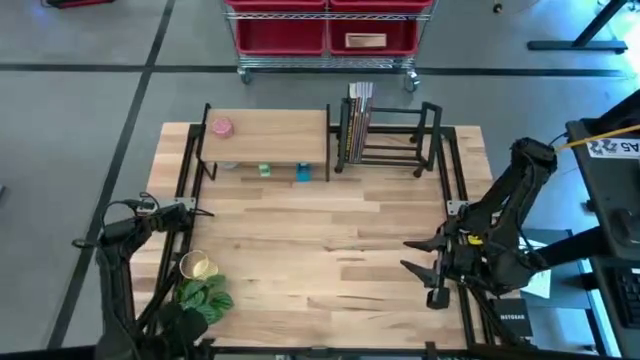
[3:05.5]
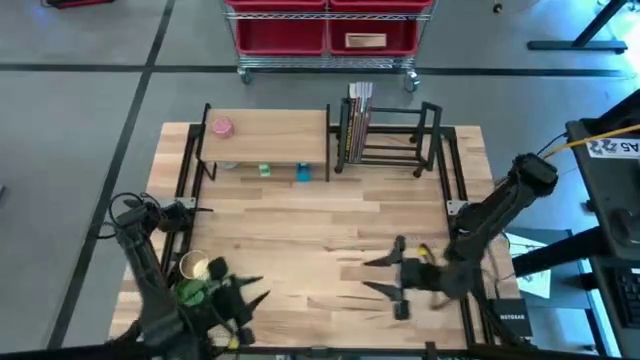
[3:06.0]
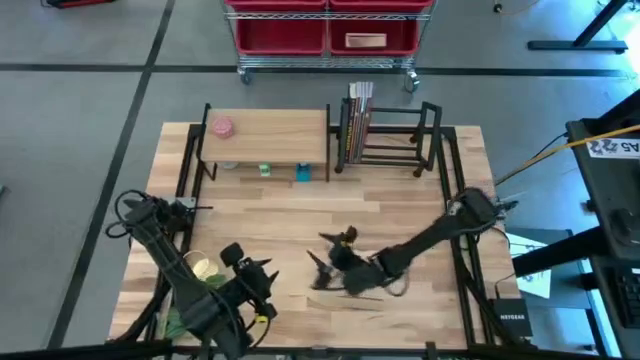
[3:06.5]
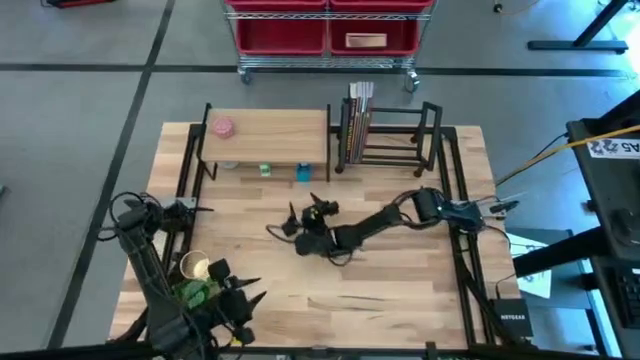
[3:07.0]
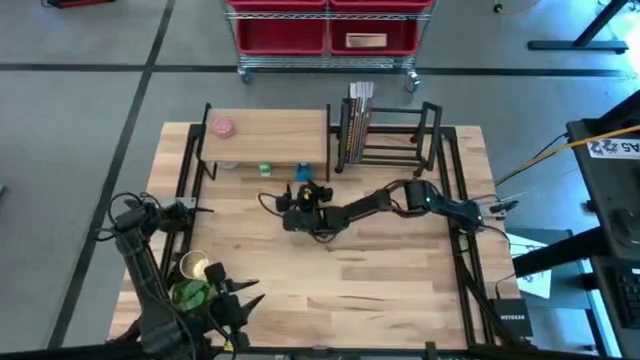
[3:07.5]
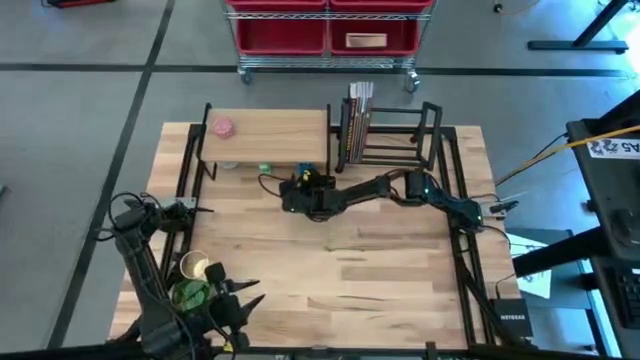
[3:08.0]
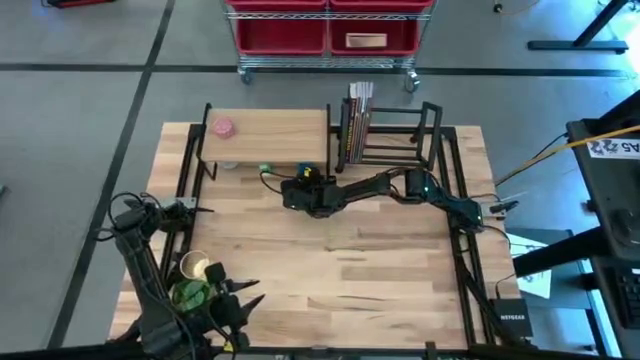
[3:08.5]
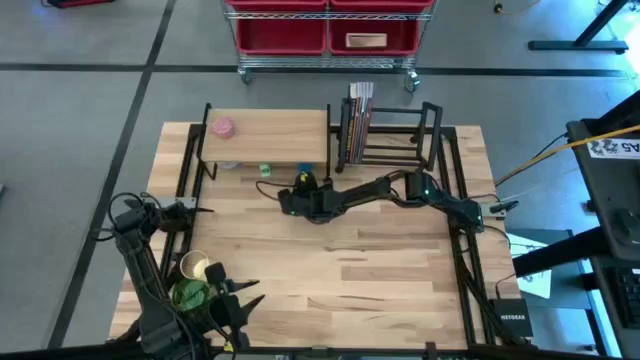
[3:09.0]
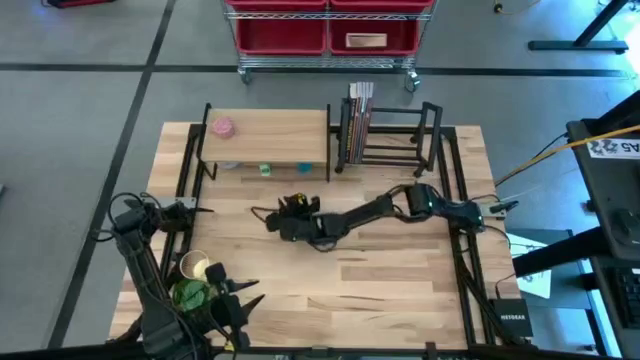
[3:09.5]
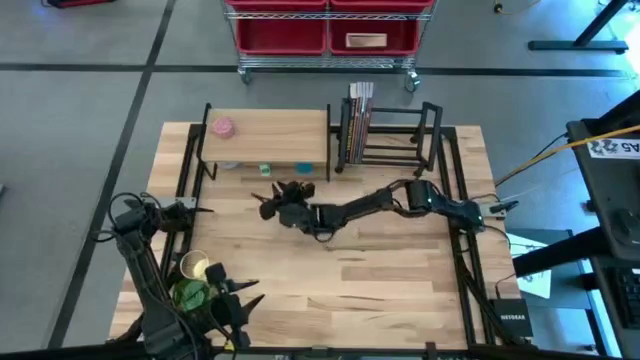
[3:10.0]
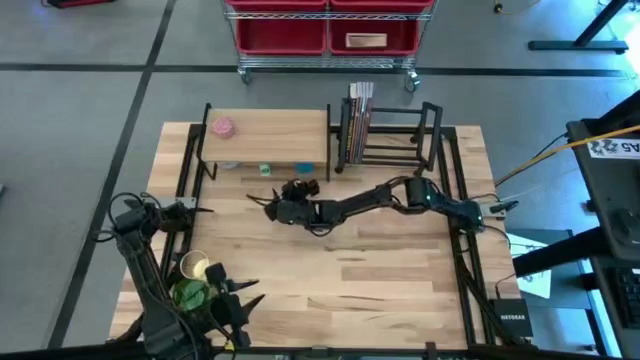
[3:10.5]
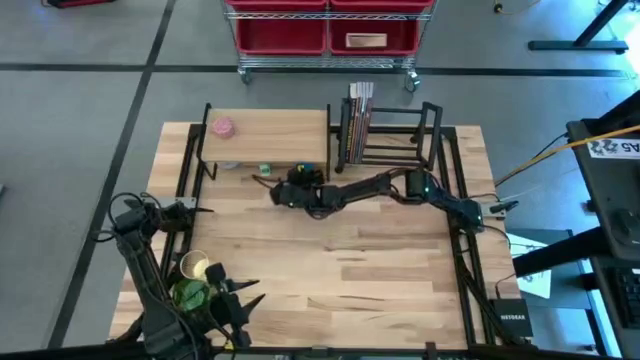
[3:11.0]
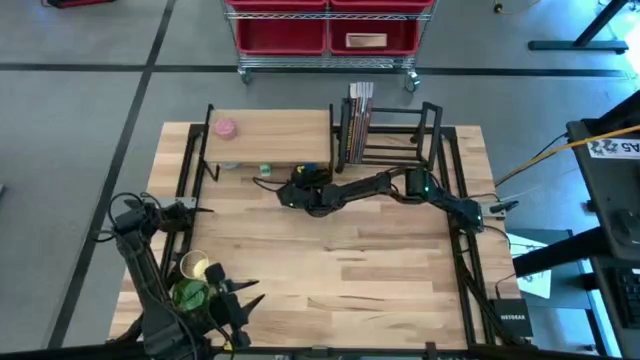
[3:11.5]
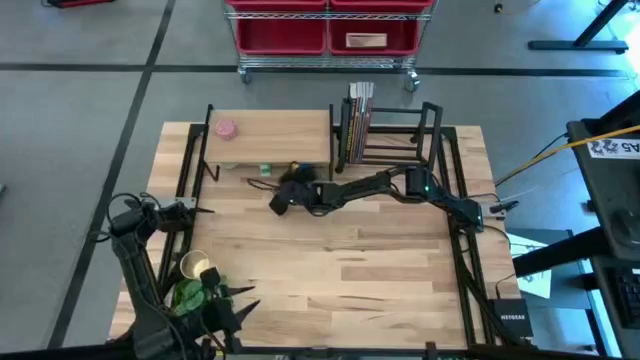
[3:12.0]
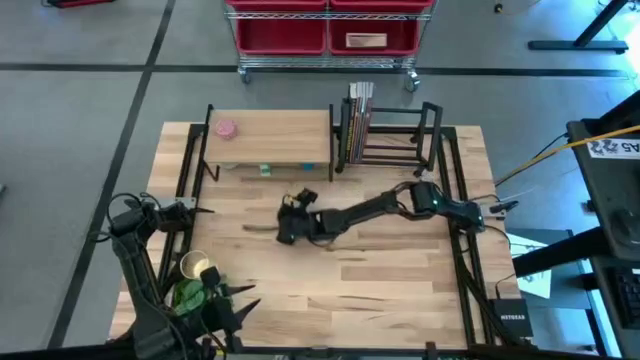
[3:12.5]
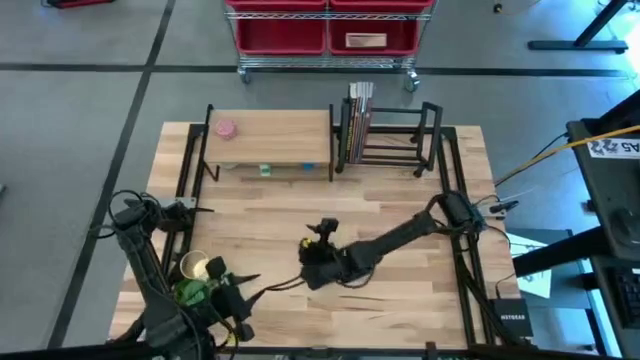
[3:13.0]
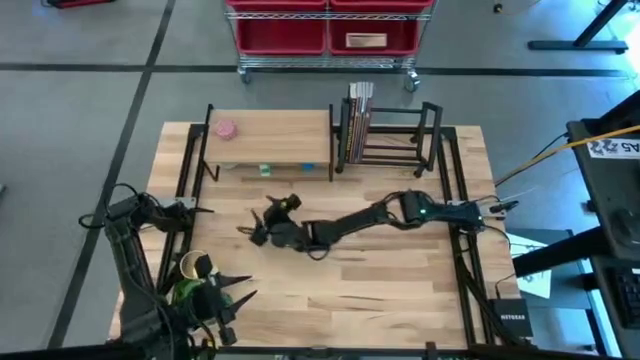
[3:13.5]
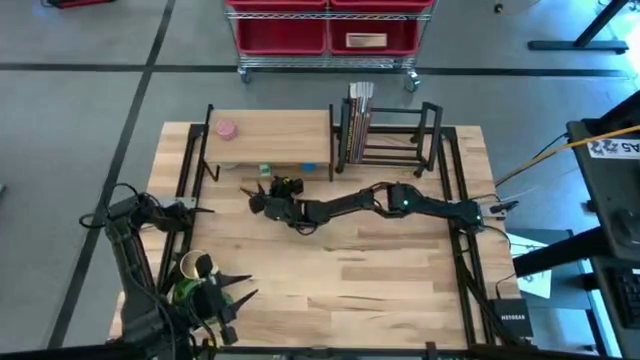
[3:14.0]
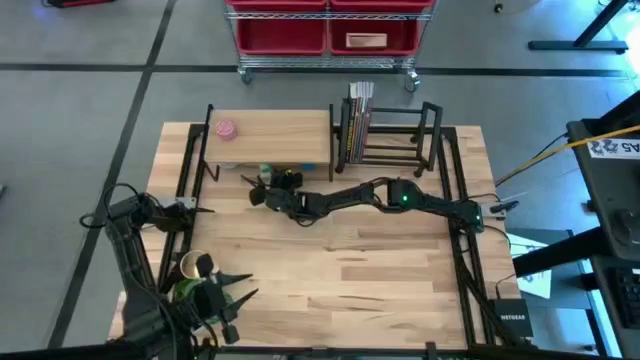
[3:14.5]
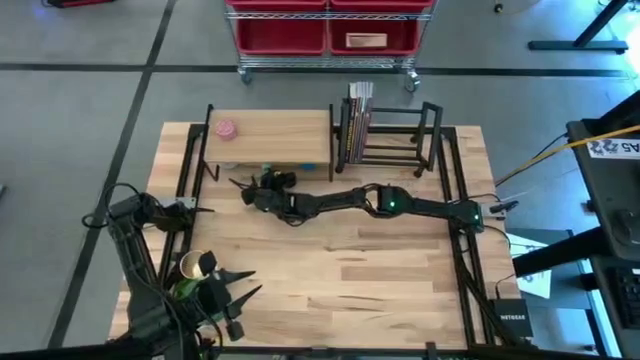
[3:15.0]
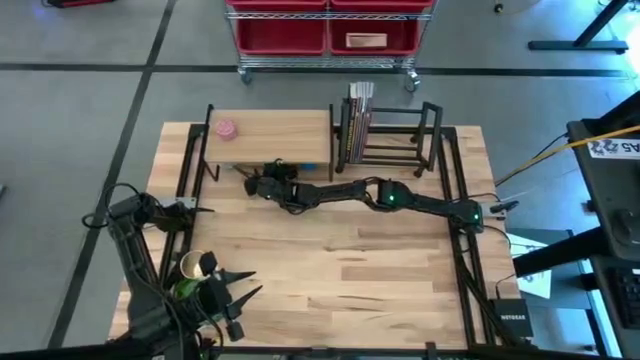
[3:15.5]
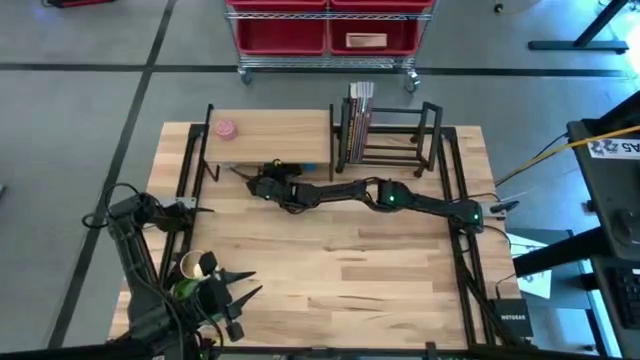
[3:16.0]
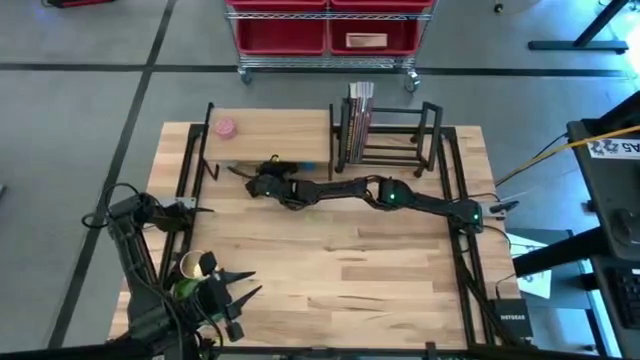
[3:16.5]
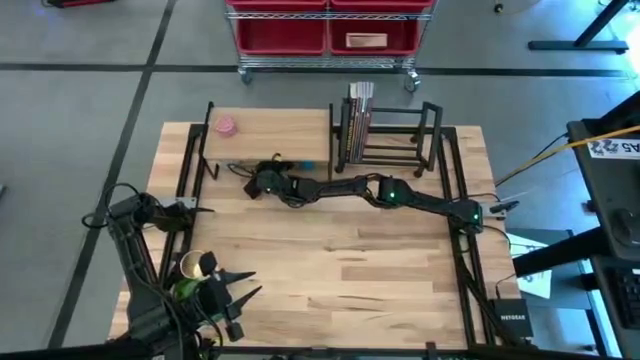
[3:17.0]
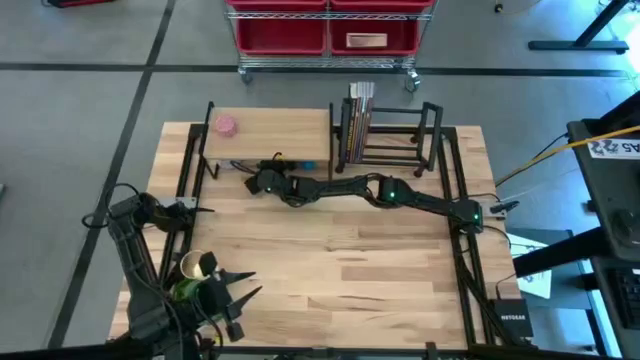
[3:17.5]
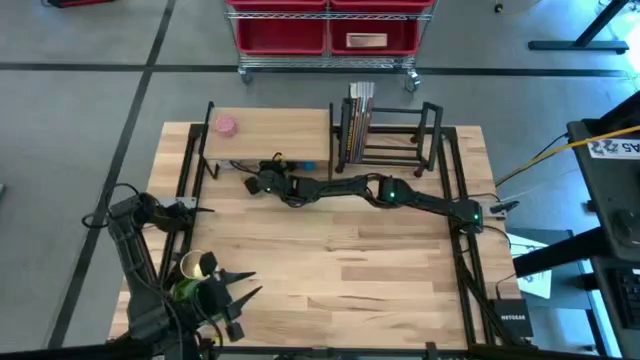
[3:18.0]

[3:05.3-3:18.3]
Task: Stock shelves
Remove the blue tape dispenser and green stapler from under the shelf

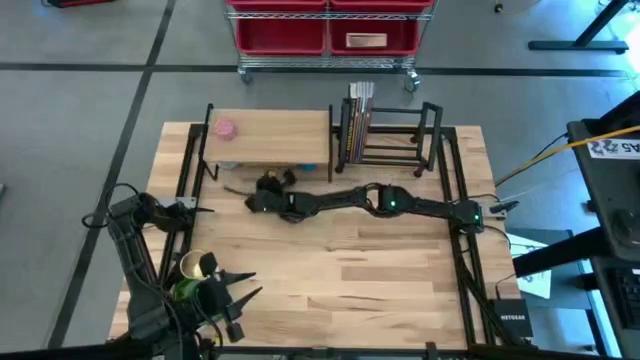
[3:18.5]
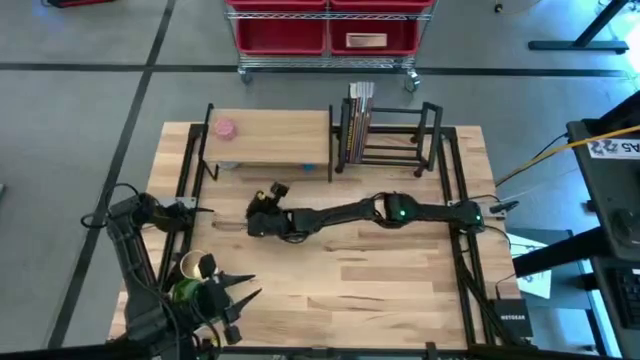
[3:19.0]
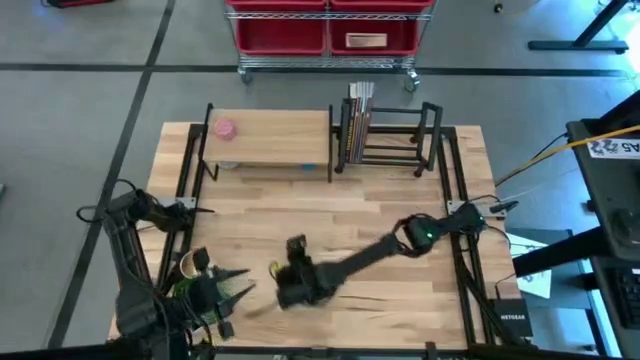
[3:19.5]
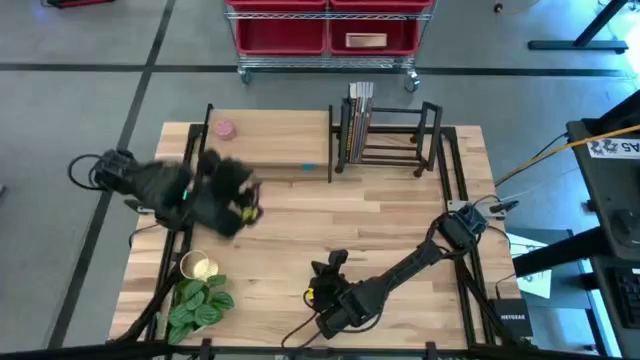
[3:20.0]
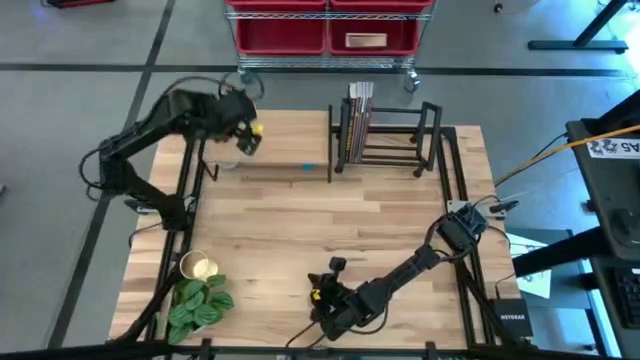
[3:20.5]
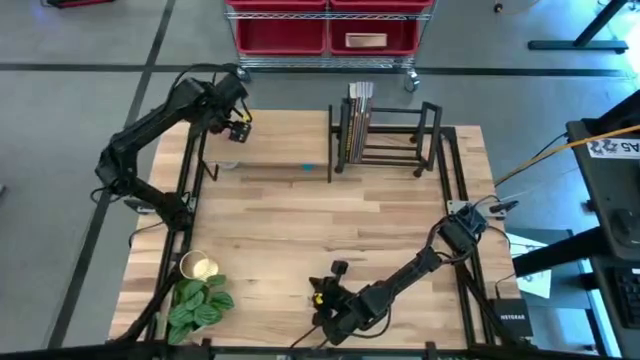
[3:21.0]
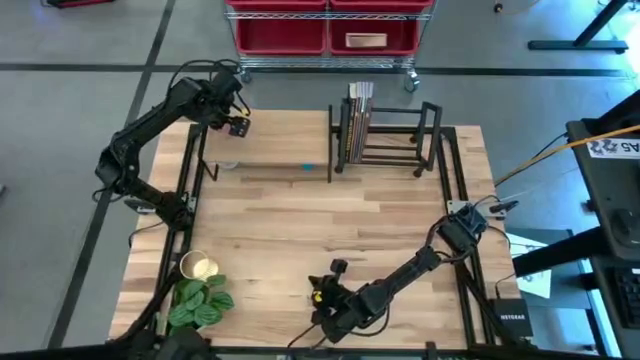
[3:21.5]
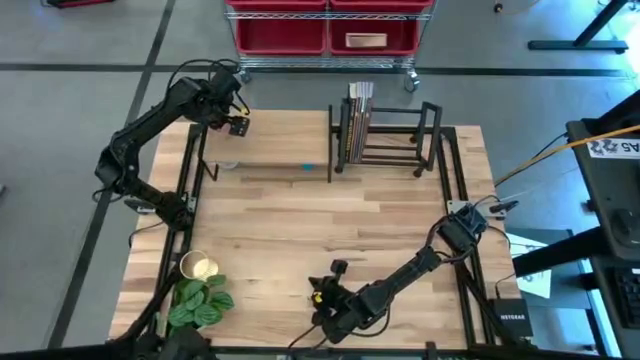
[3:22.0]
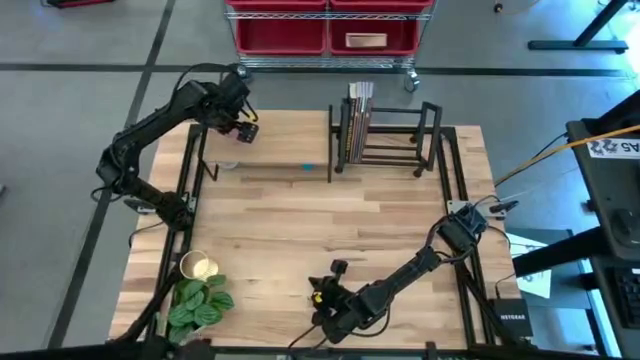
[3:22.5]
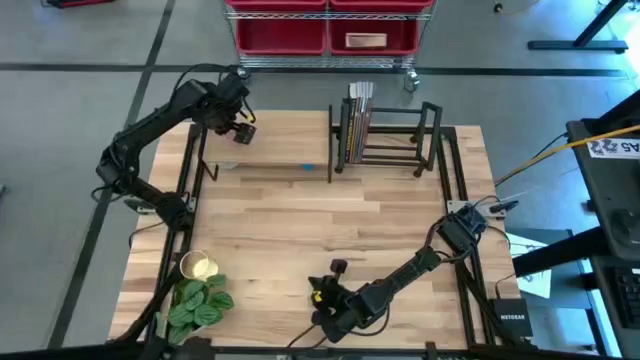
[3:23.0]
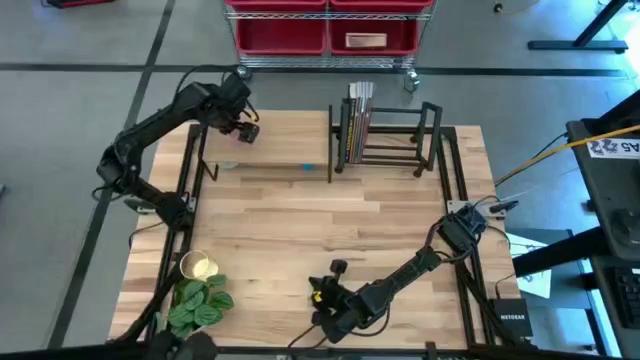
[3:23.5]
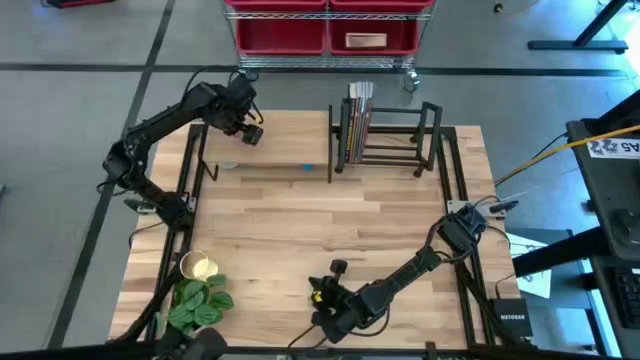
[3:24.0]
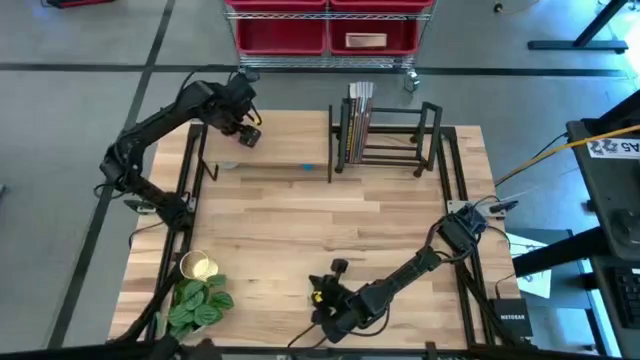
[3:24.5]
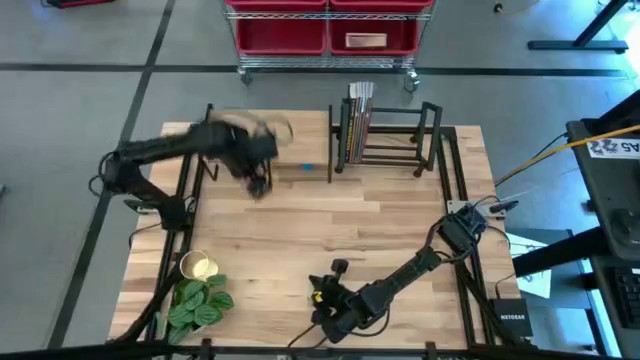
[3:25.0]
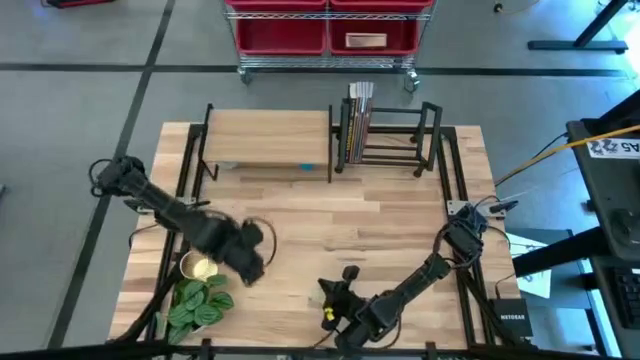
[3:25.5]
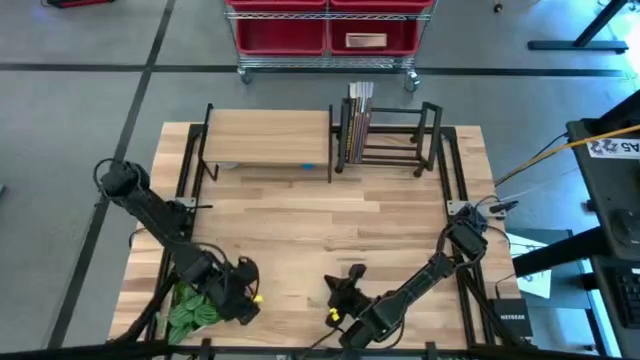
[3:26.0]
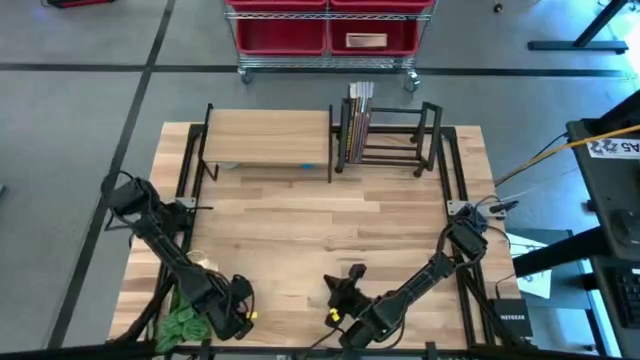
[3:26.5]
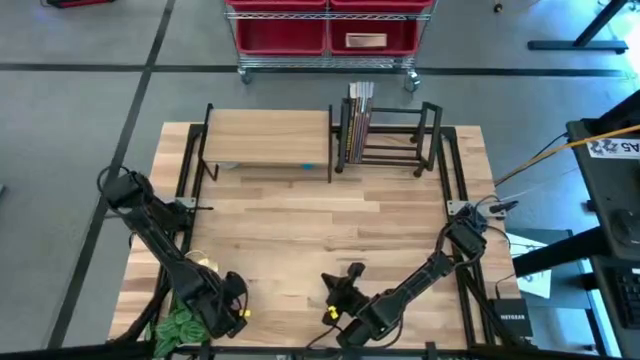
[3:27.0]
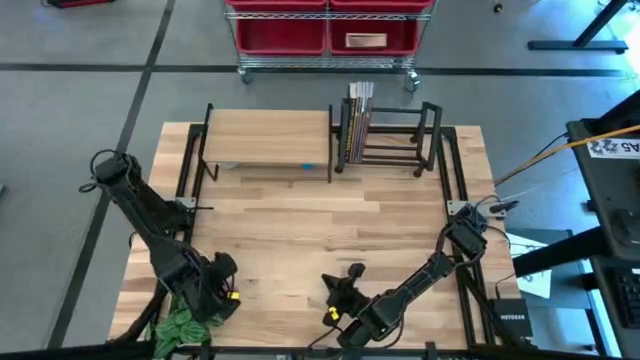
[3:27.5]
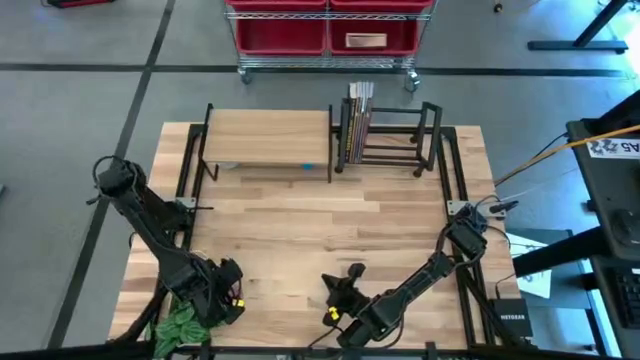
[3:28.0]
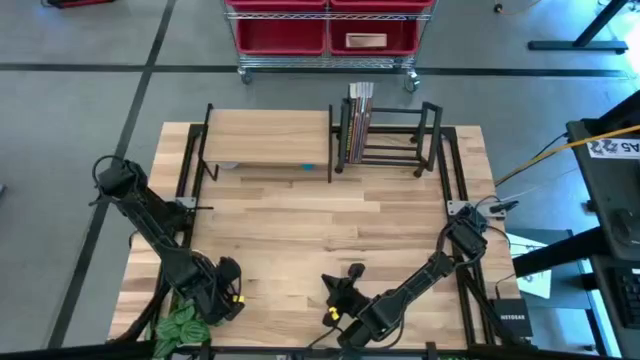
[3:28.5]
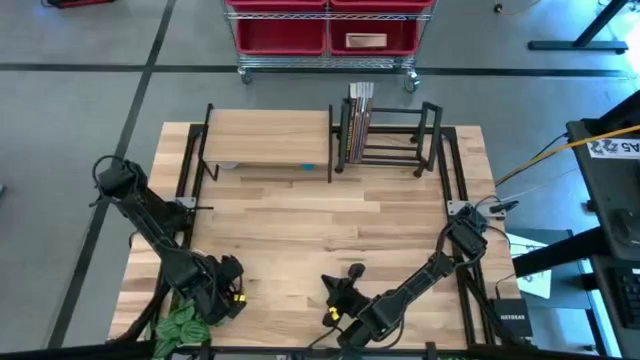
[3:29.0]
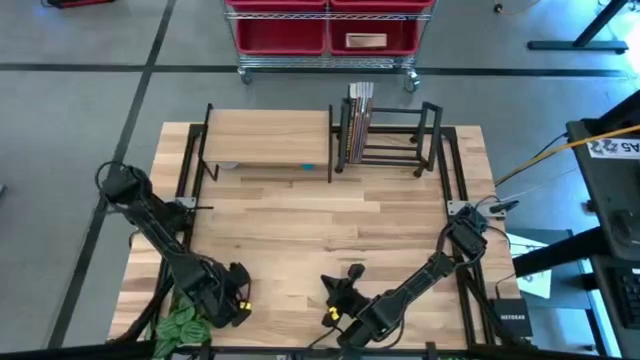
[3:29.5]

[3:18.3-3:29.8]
Remove the red scented candle from under the shelf
